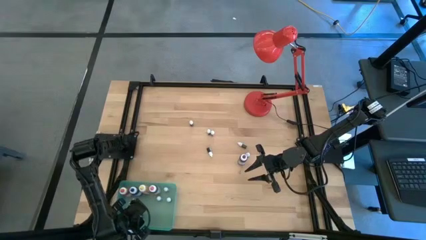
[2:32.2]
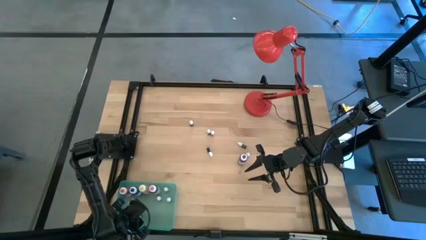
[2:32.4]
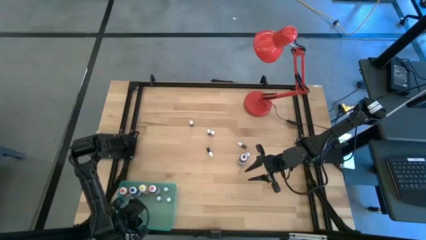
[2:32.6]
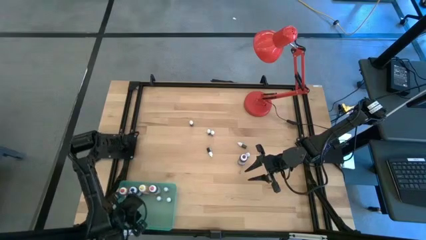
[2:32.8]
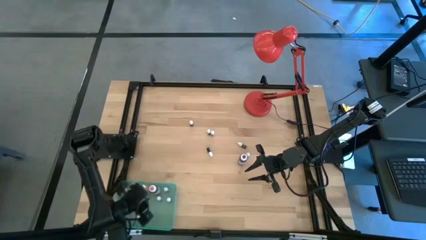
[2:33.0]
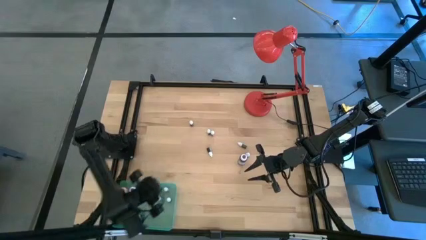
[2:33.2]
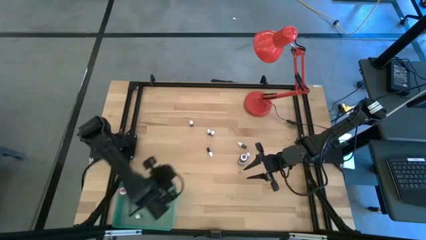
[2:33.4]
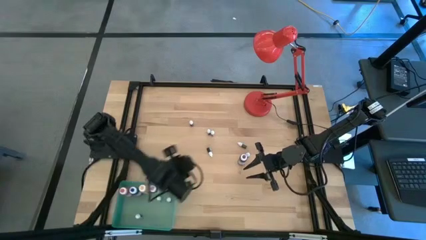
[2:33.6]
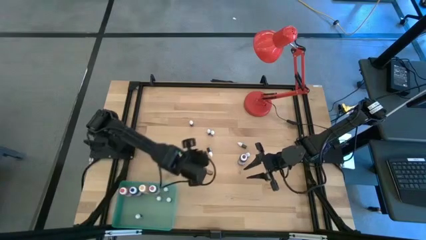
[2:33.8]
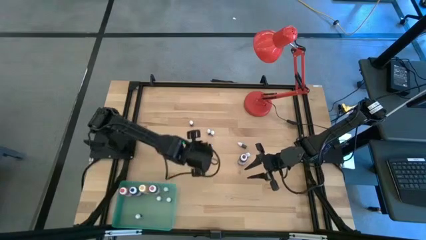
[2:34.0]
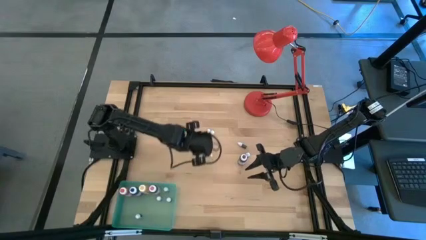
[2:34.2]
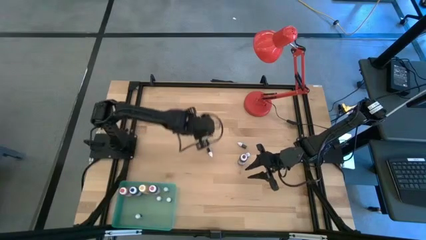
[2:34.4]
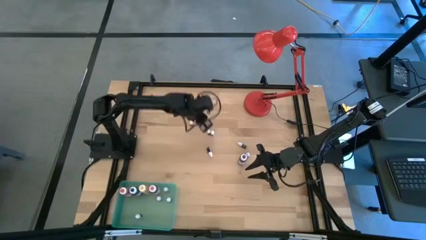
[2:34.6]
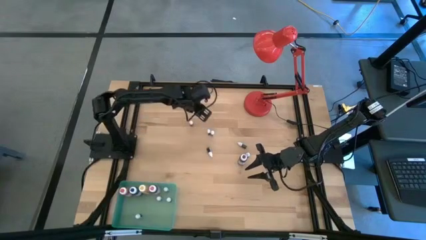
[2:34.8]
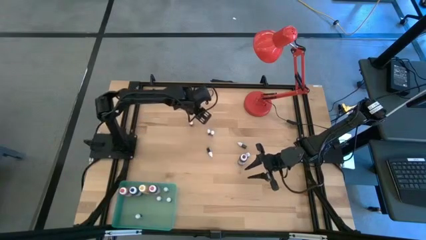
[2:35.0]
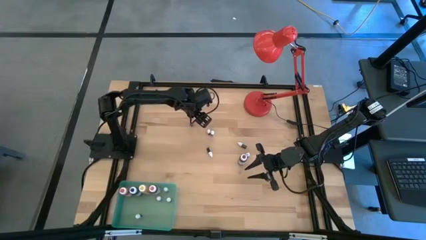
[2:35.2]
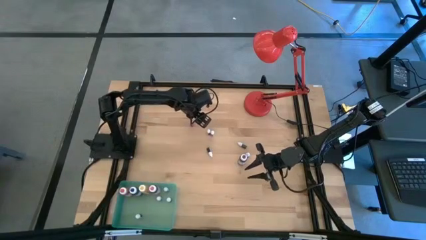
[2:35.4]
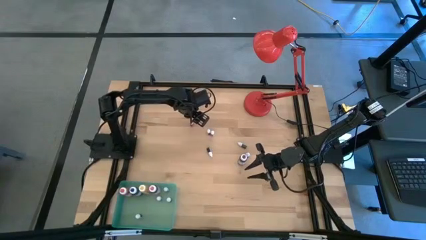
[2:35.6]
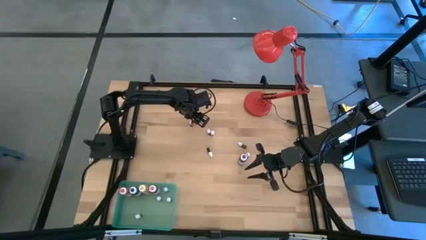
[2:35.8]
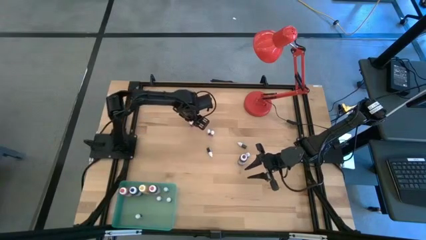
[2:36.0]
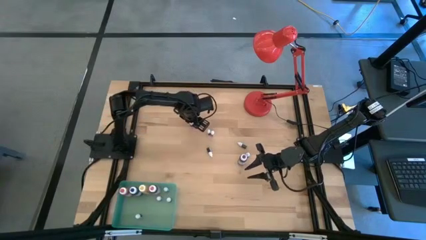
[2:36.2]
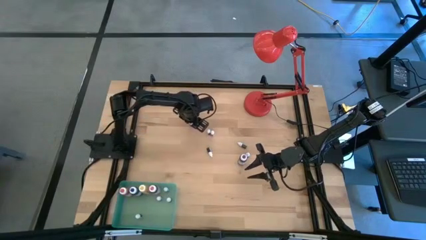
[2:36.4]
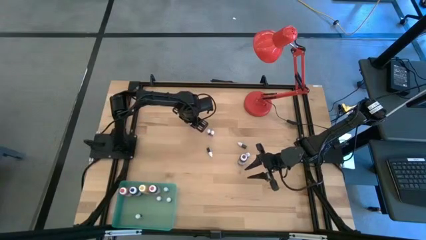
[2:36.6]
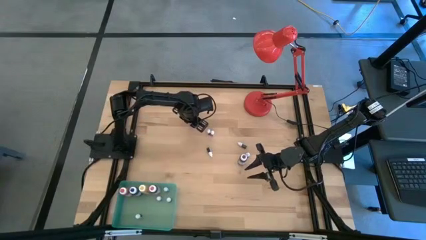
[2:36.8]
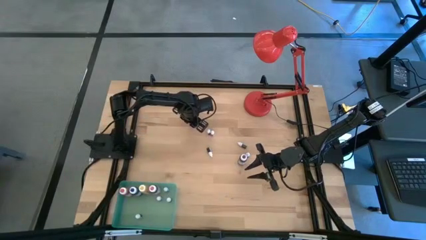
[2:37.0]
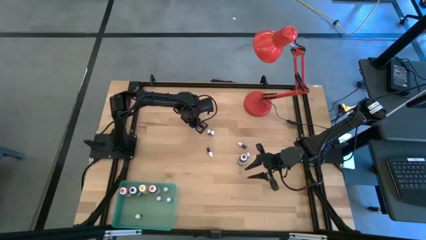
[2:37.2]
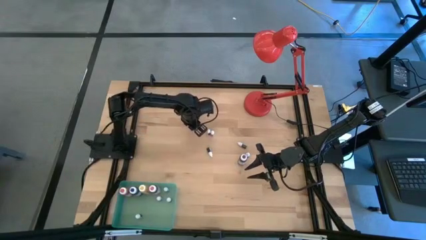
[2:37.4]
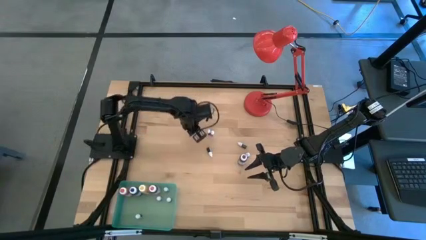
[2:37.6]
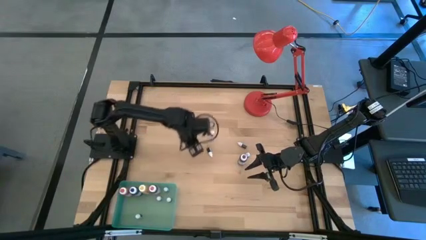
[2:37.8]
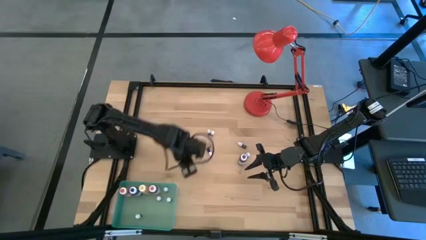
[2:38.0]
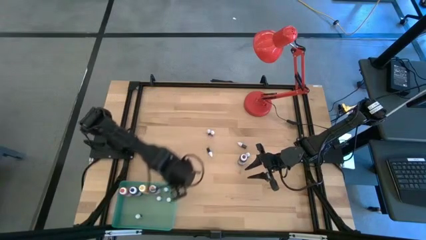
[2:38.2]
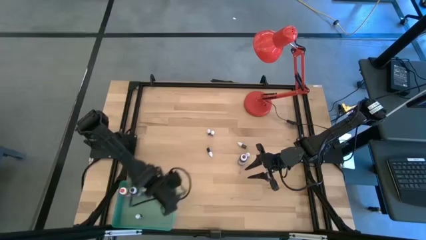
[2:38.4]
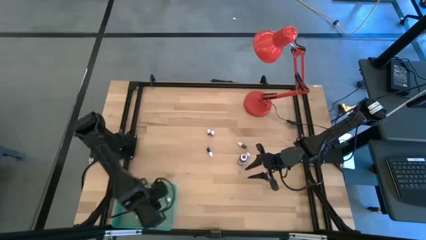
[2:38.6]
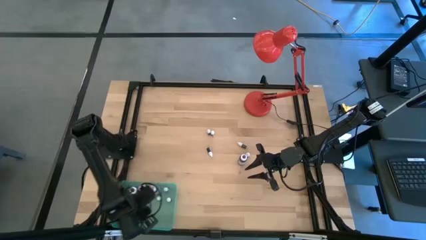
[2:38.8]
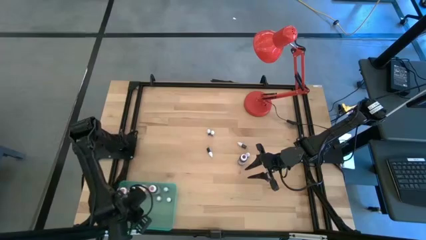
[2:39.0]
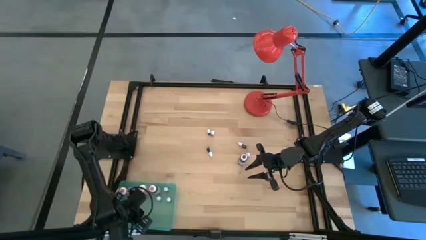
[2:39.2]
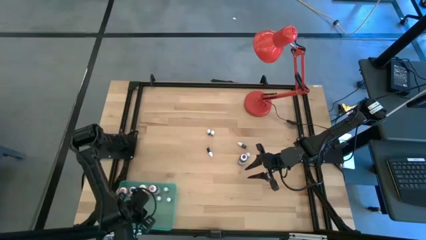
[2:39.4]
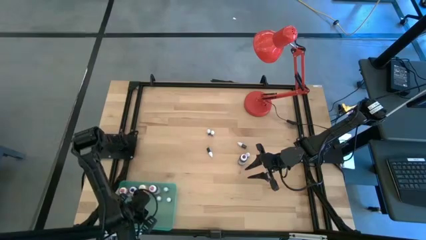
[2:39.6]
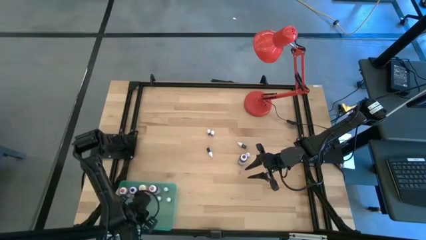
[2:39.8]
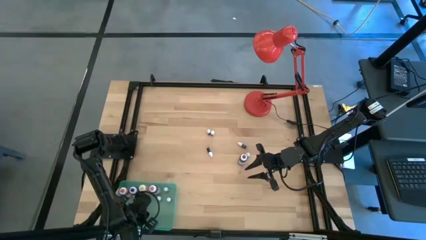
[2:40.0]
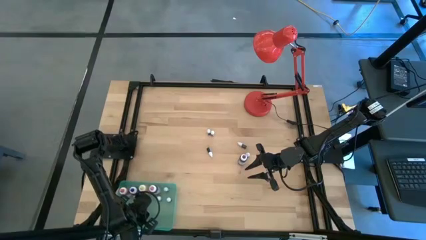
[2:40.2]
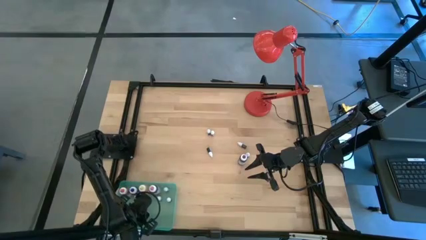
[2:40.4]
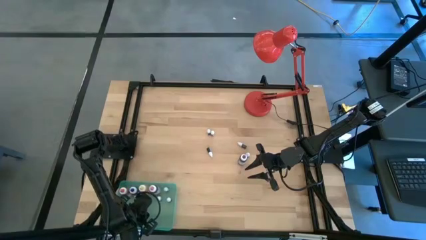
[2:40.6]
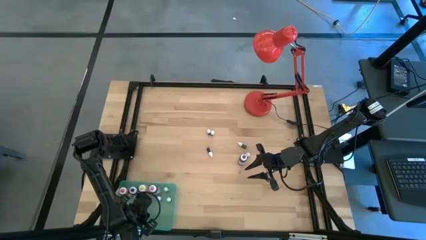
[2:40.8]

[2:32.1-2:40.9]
Task: Pick & Place food coloring
Put the pink food coloring into the blue bin

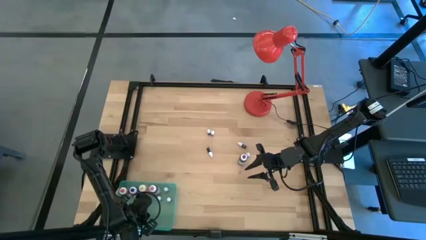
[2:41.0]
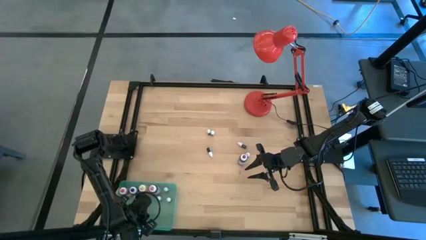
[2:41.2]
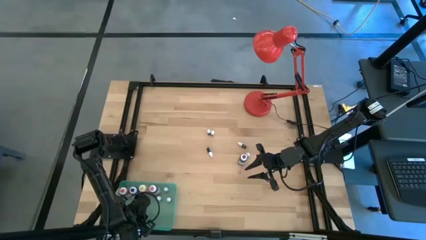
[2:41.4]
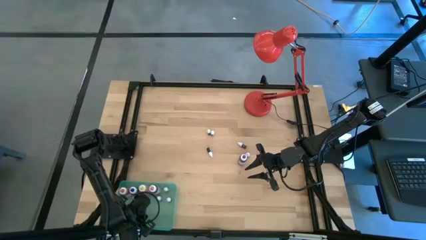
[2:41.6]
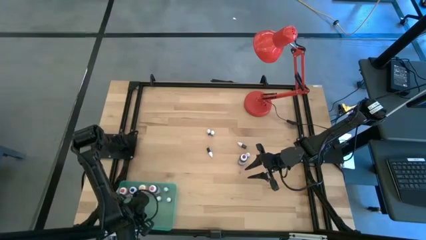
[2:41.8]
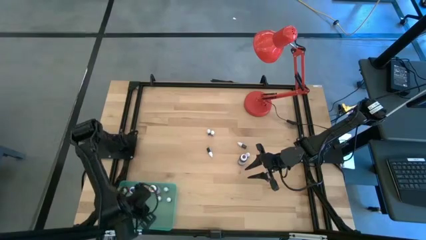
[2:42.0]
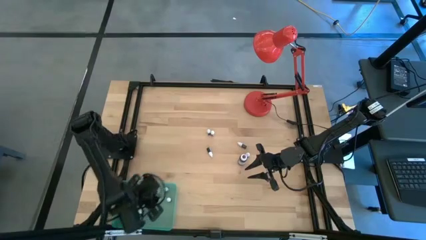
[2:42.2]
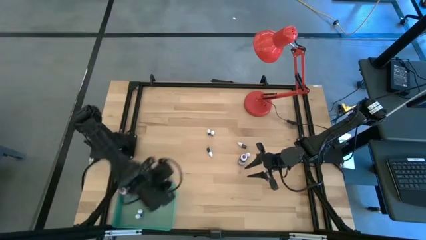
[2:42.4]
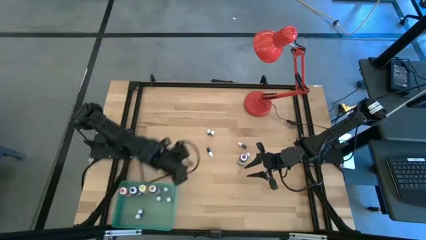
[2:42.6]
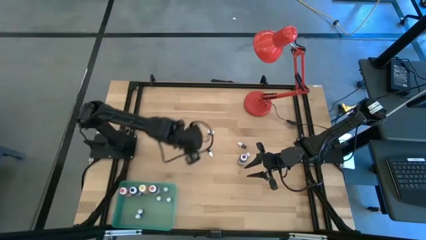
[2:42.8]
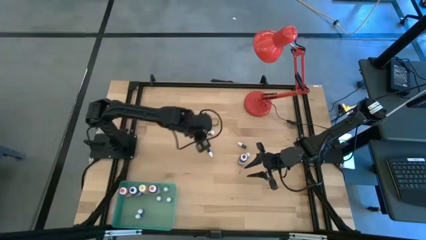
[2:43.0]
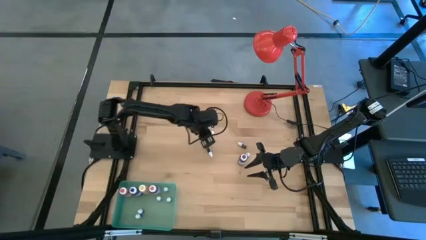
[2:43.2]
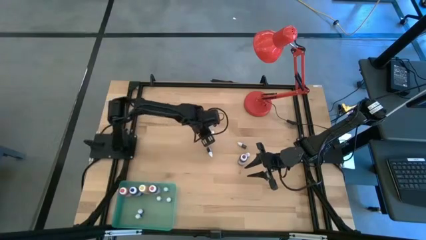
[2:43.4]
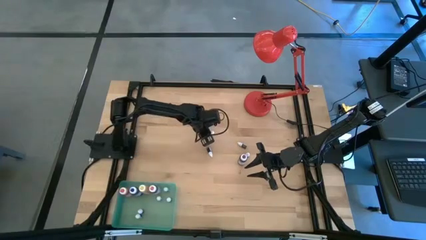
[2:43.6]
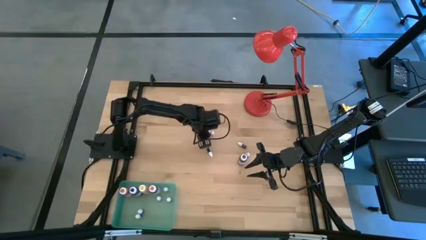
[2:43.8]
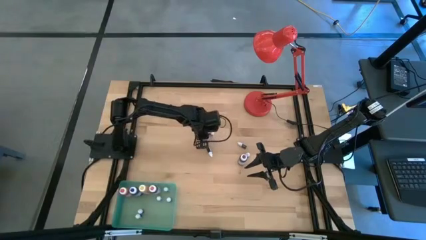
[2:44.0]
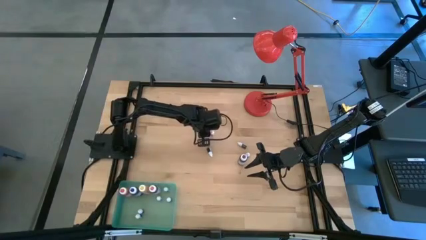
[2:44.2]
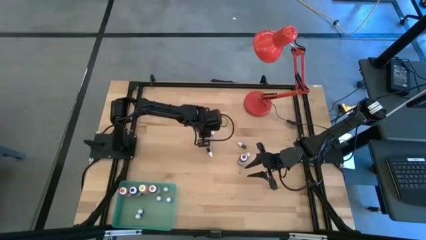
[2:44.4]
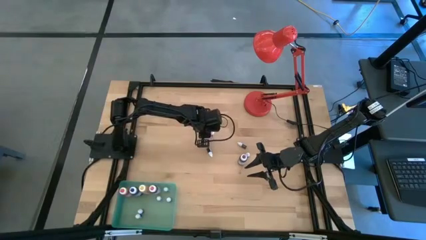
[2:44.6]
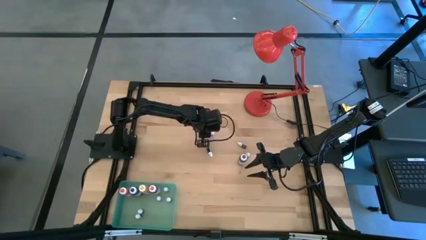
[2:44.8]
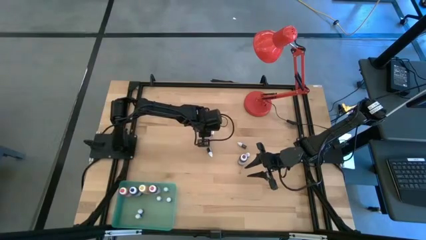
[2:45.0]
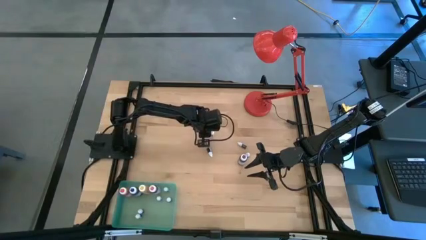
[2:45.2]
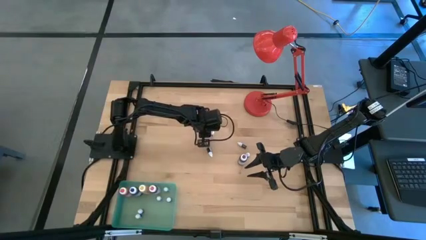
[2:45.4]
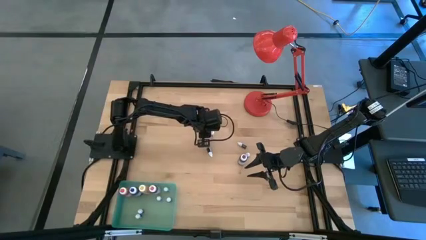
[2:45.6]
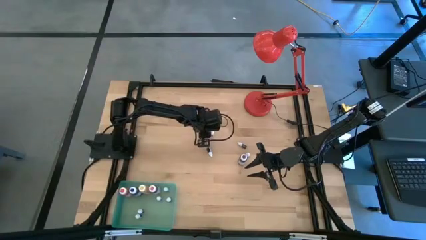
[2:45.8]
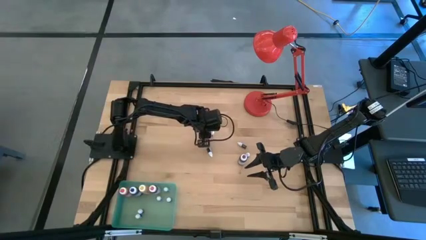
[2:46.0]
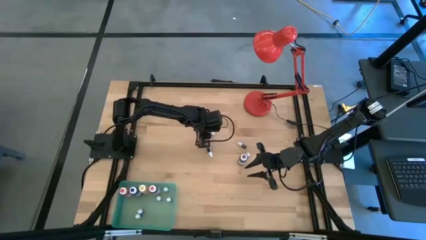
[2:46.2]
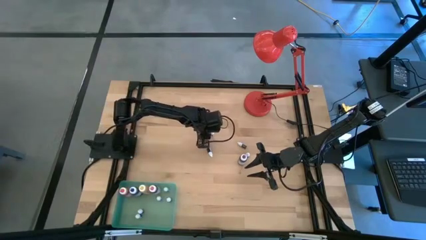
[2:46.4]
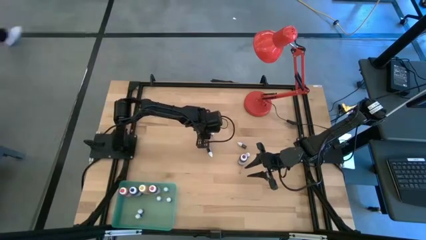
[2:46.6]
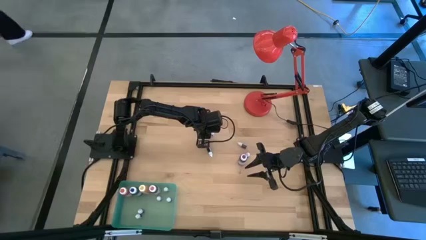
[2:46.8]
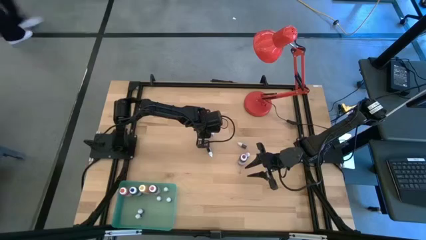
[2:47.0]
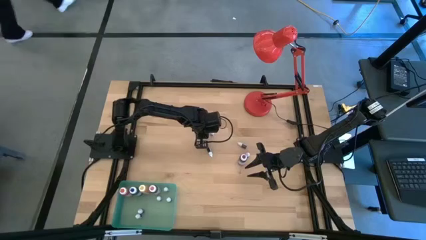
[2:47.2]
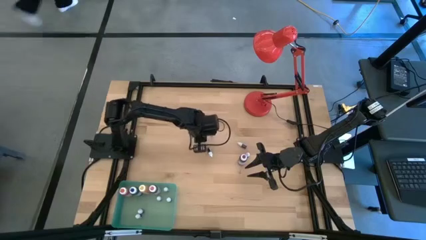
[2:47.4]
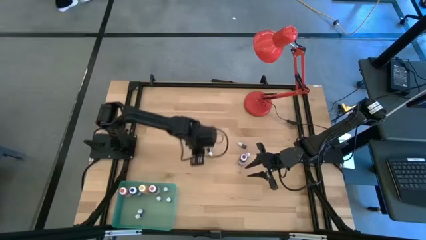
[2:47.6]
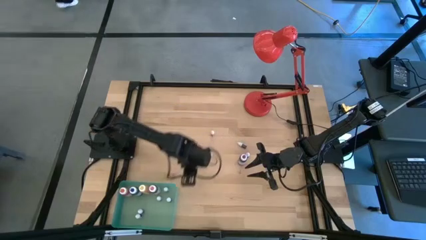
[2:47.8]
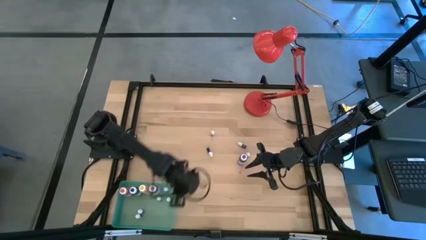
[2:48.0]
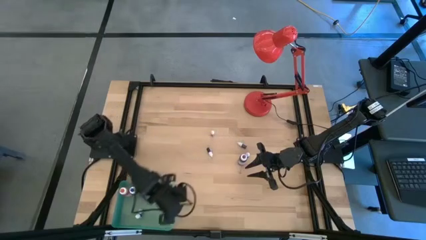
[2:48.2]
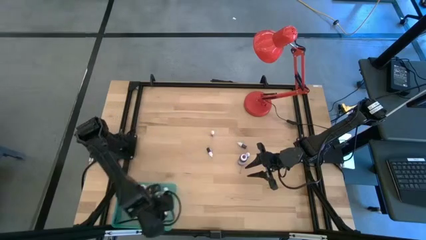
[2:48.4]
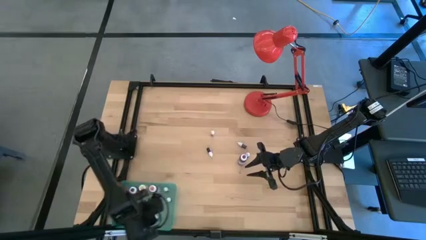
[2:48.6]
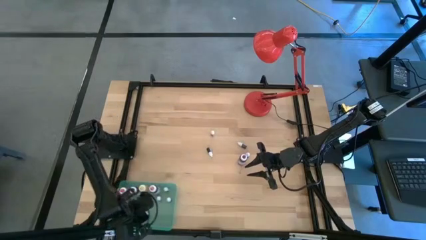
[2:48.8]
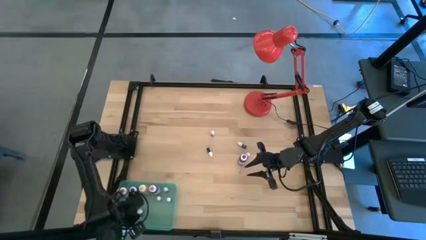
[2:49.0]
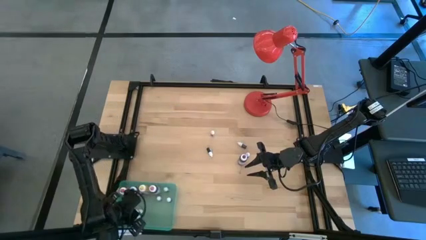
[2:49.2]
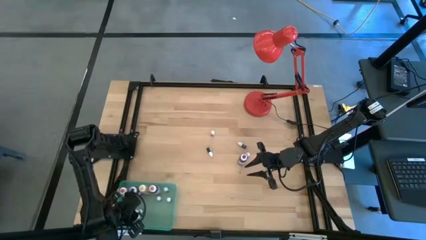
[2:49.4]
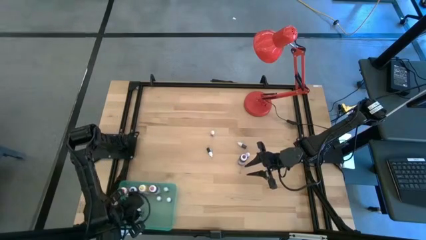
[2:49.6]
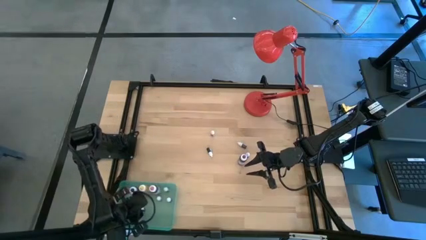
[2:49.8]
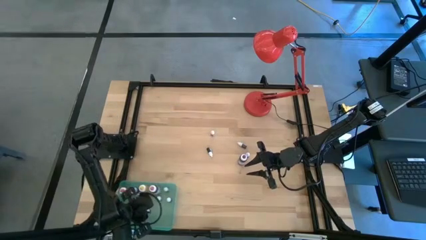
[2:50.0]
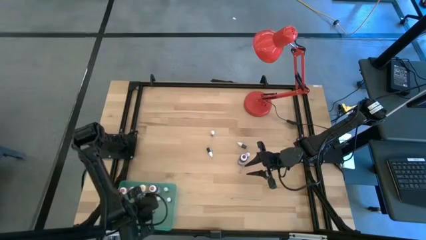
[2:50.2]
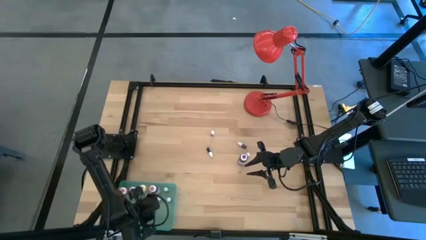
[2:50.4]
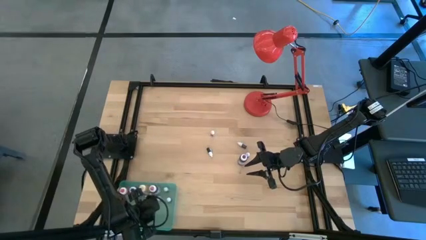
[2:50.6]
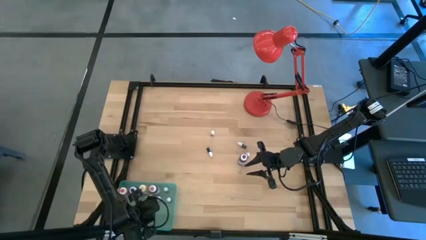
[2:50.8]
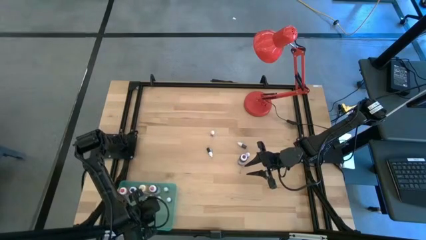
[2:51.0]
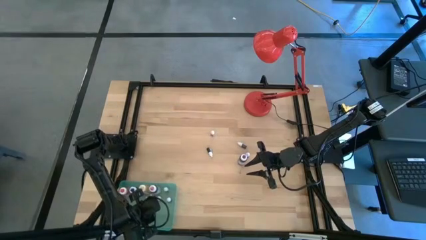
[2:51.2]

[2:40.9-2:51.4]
Put the black food coloring into the blue bin
